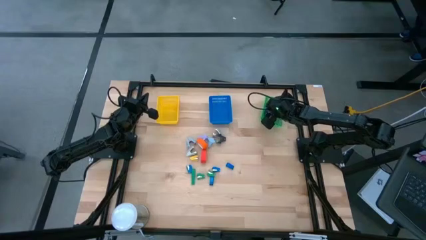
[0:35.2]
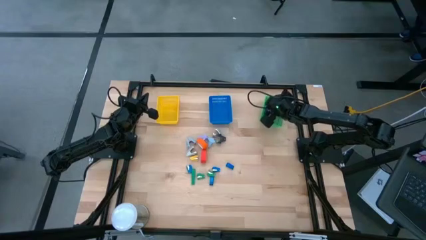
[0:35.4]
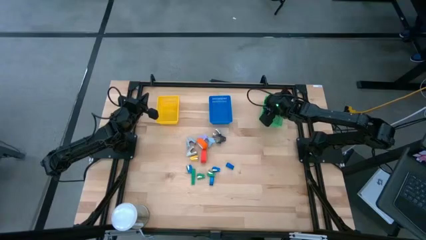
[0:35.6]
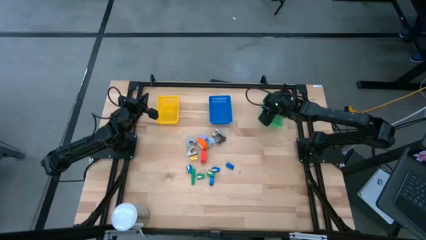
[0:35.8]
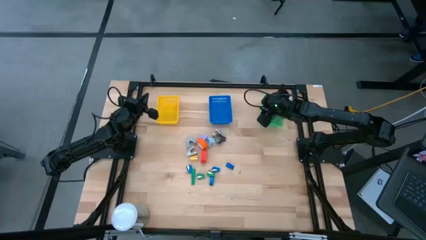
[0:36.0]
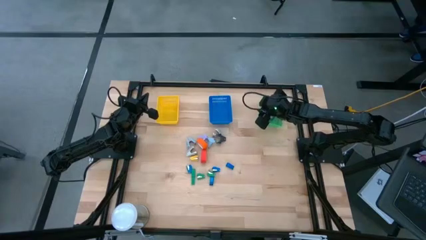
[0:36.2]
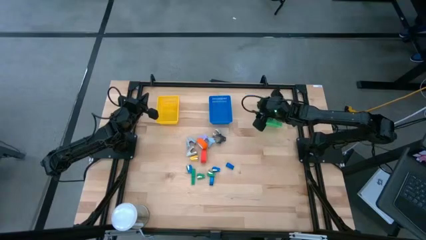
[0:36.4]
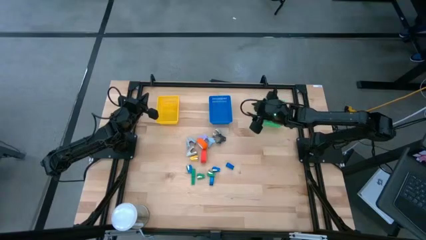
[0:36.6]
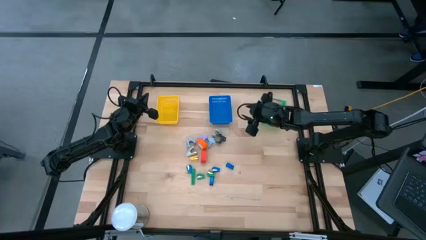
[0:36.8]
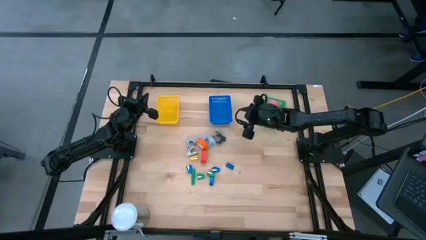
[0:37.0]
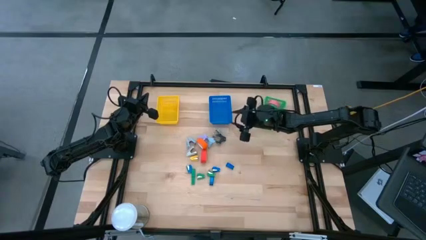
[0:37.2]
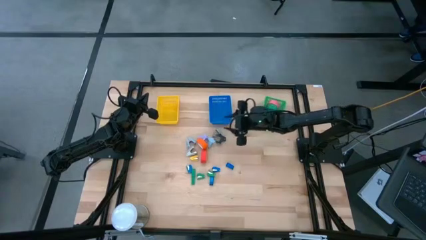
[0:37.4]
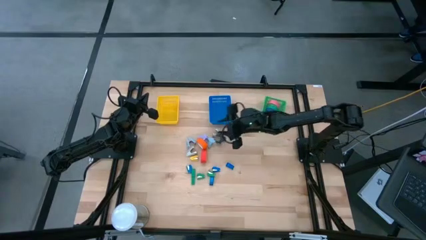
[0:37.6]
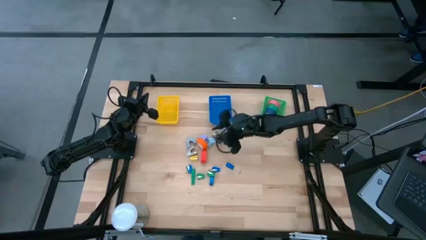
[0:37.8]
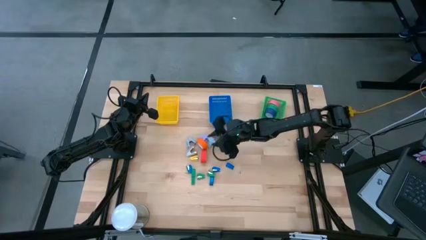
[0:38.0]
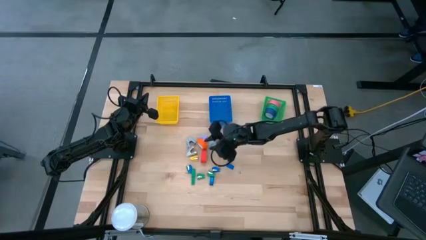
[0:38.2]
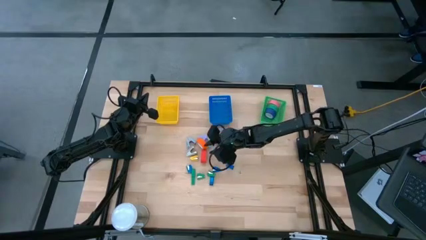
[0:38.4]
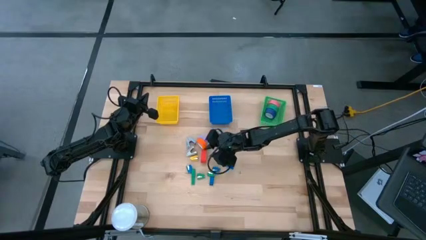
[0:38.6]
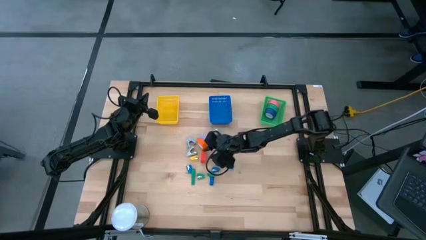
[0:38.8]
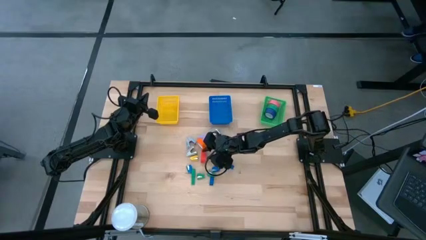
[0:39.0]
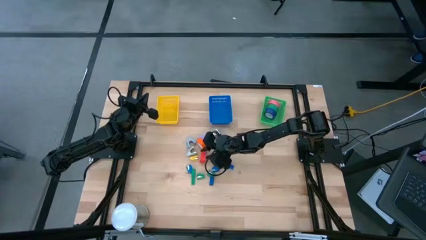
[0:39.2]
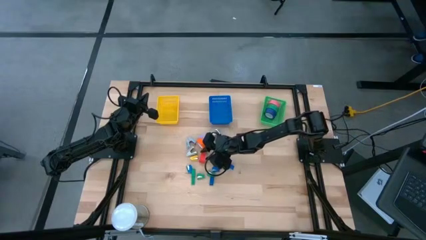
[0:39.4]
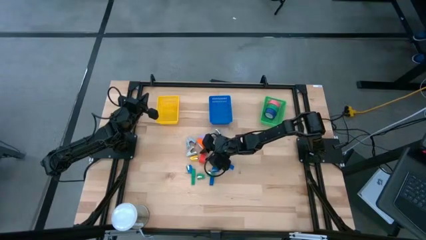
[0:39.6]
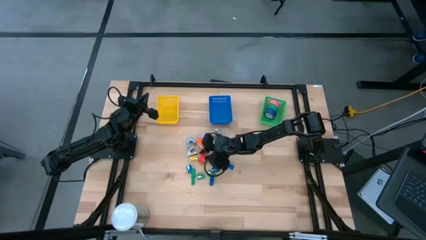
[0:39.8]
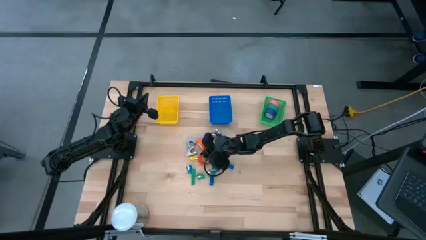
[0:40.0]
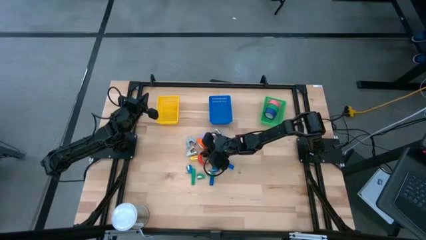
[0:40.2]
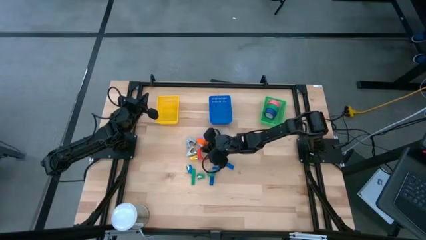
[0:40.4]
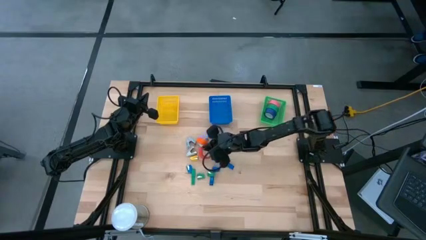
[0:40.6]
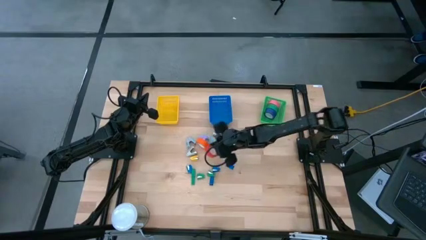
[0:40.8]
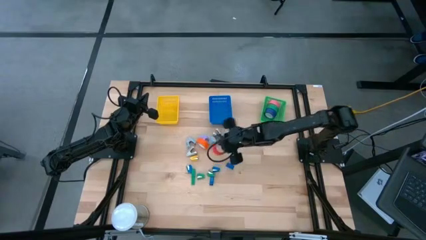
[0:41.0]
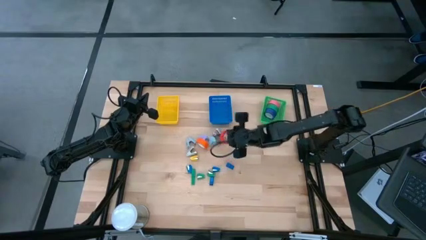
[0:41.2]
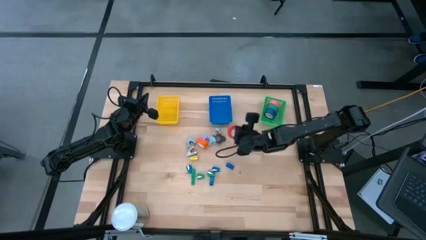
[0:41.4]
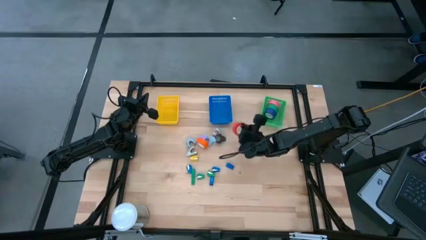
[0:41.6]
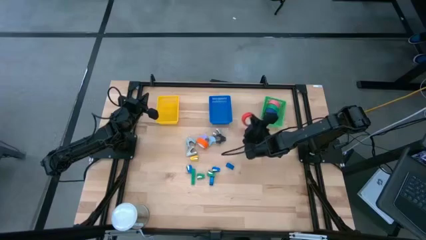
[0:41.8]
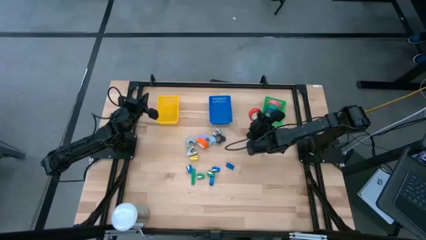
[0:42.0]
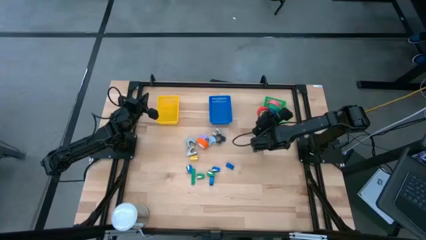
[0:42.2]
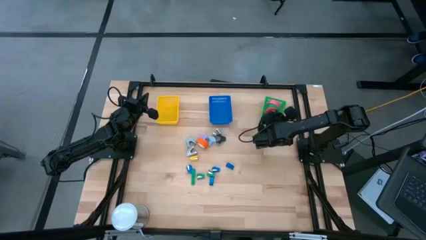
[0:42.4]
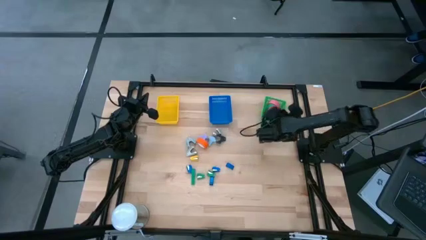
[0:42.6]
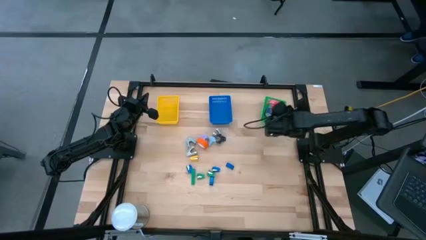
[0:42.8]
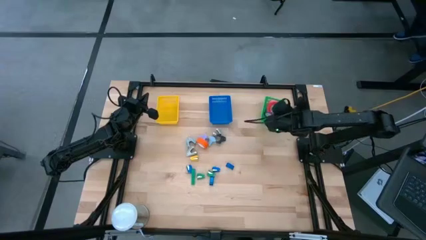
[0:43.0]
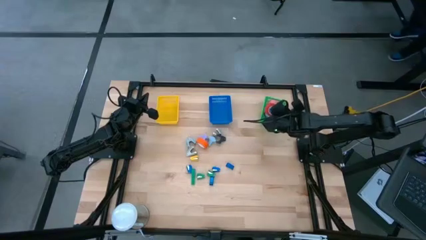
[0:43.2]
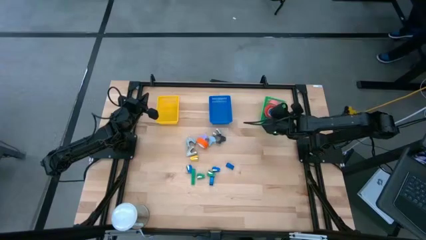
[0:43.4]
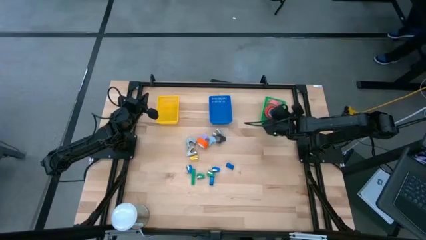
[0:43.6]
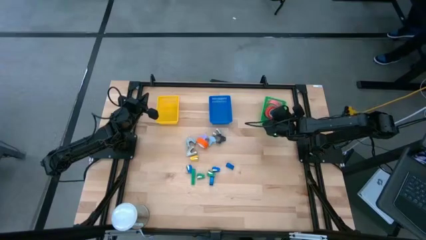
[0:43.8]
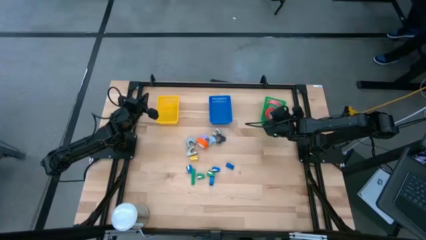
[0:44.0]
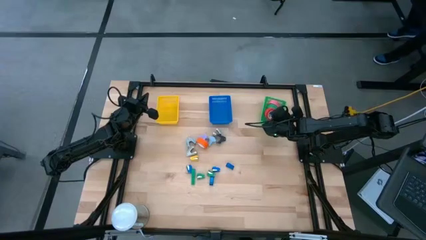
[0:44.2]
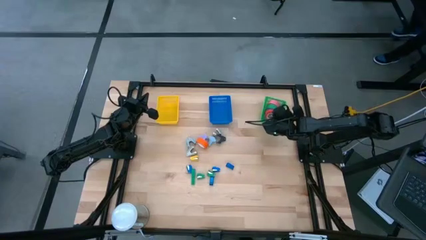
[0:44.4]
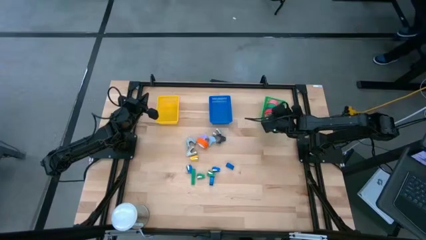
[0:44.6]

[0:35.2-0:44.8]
Task: Pick and place Stapler, Stapler remover, tape
Put the red tape into the green basket

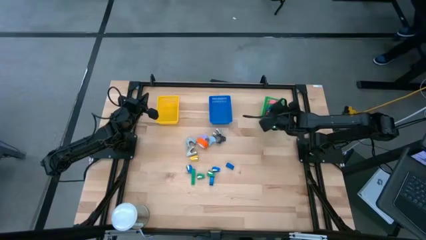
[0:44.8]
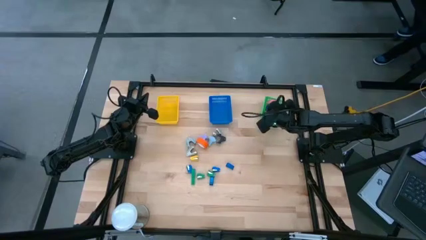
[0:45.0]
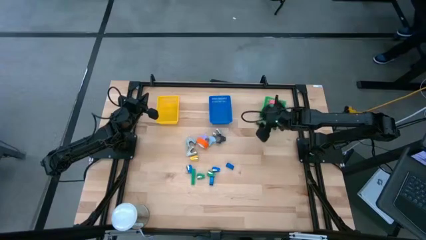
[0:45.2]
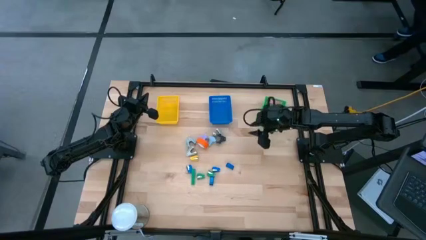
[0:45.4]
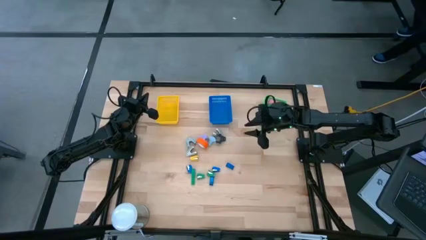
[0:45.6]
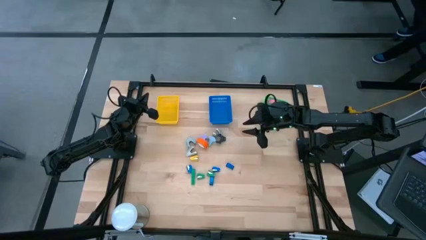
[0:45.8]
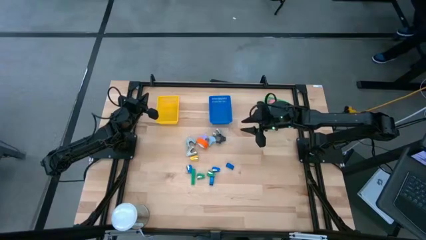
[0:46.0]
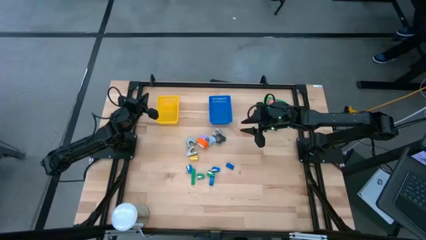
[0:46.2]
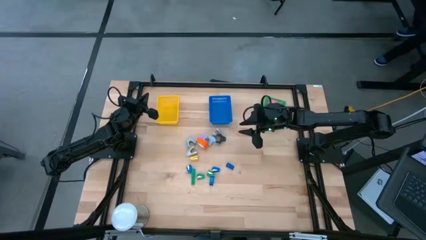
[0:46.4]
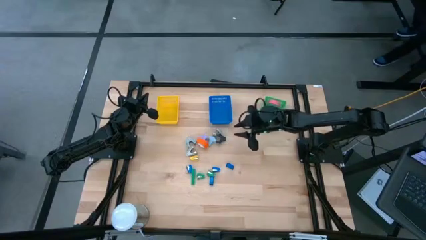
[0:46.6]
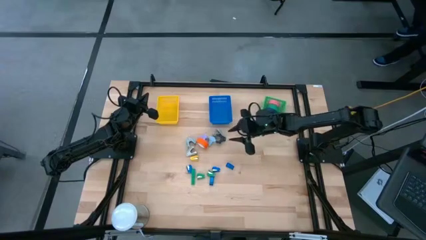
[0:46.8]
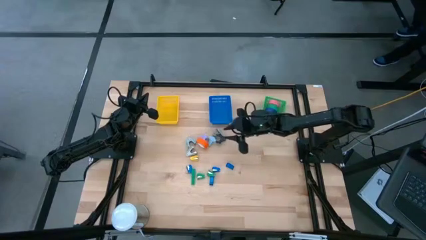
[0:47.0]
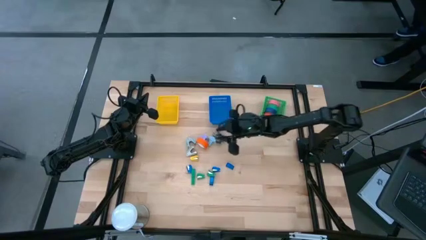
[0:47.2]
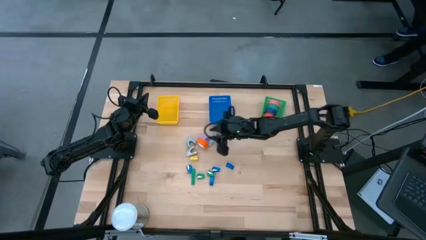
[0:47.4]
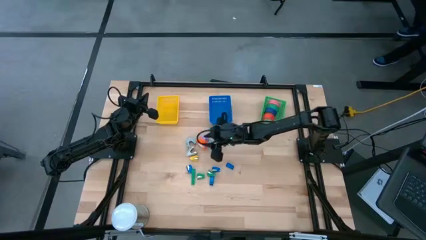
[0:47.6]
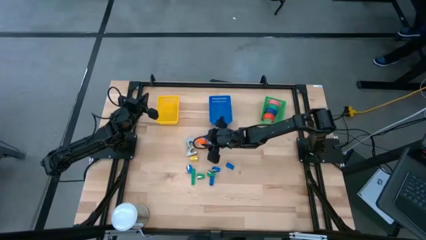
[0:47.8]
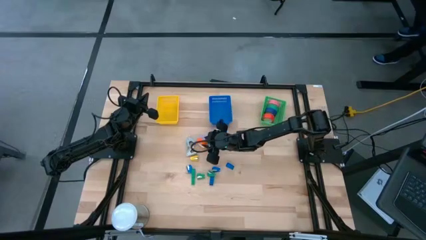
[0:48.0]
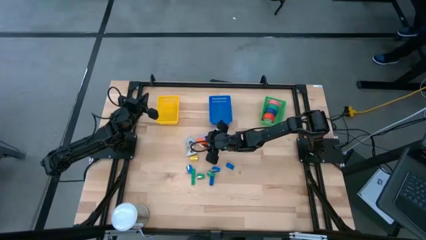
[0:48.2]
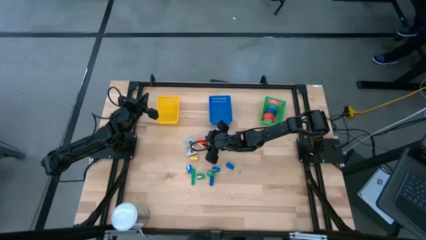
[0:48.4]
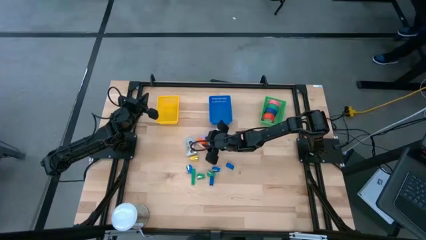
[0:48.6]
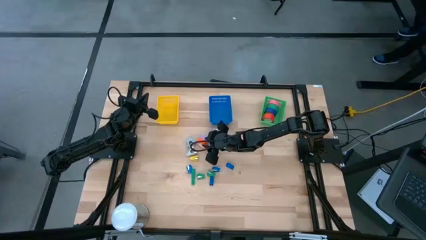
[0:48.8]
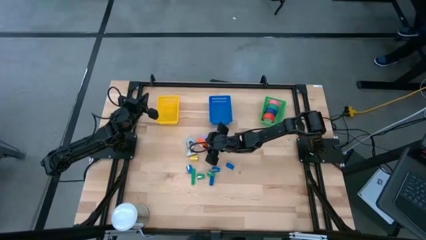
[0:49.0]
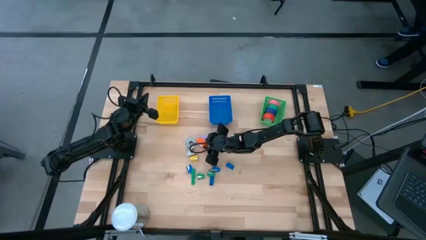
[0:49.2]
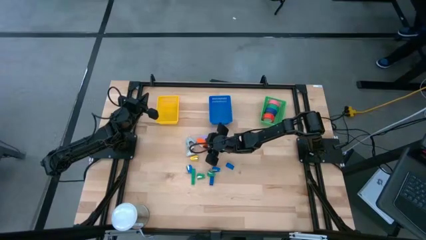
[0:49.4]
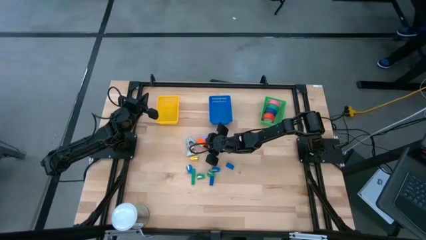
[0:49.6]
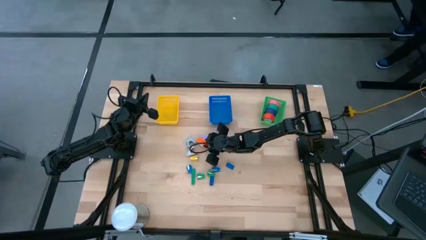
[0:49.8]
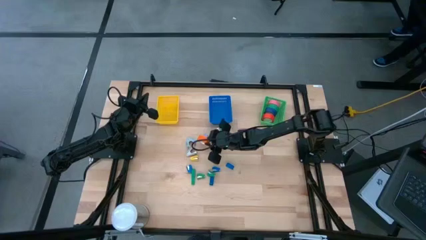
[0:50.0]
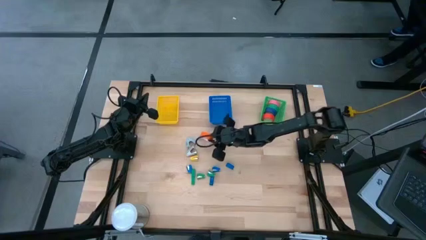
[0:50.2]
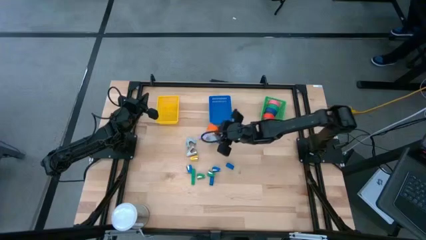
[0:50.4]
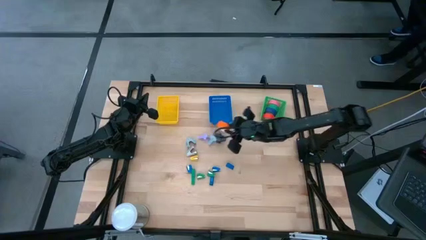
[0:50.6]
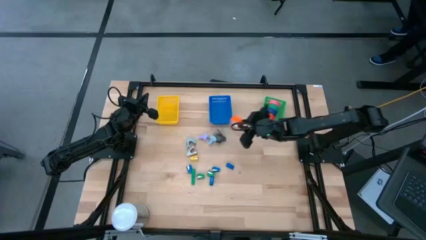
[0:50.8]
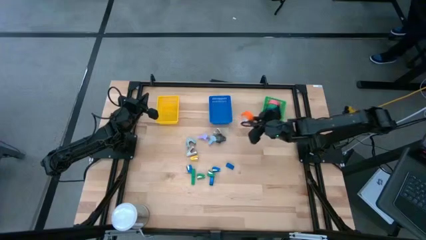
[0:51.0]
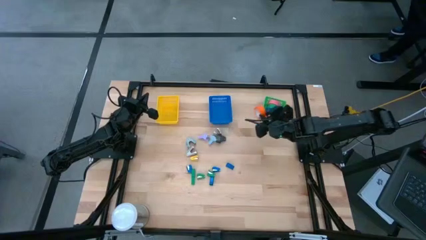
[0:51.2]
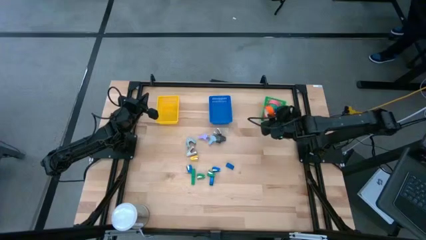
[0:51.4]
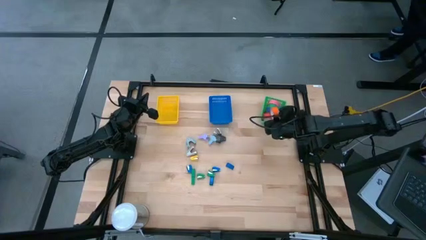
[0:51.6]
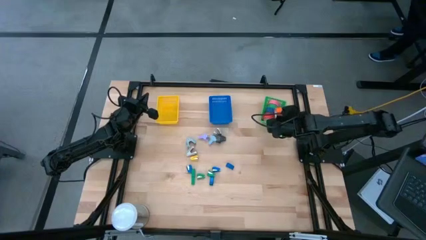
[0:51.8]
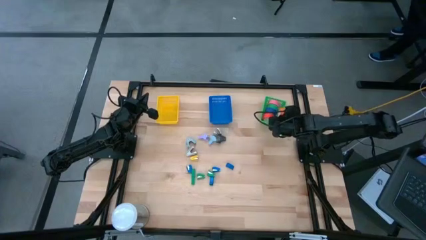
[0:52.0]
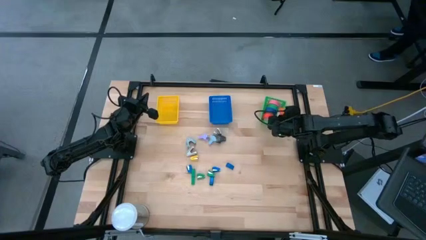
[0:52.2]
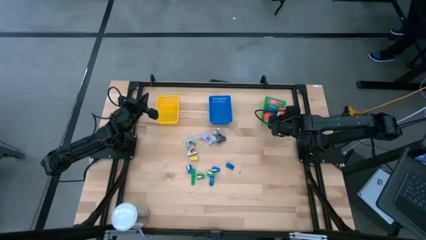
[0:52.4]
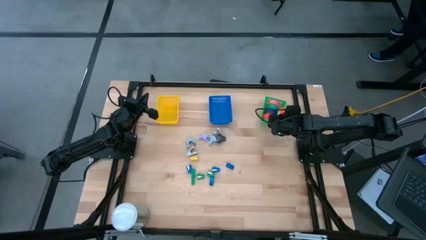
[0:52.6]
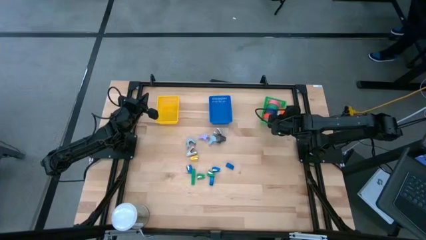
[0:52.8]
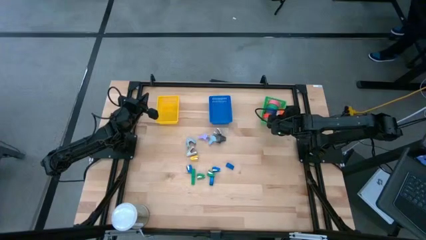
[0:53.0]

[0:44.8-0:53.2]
Put the orange tape into the green basket
